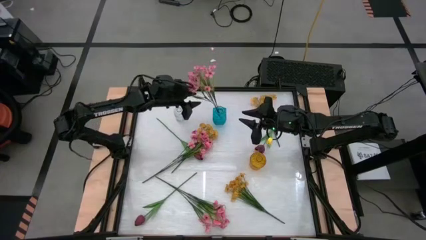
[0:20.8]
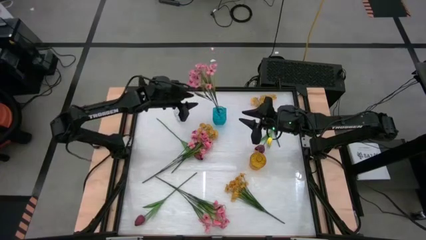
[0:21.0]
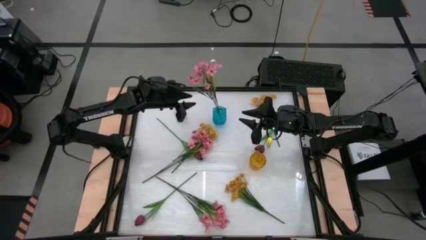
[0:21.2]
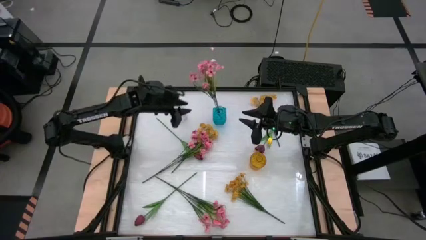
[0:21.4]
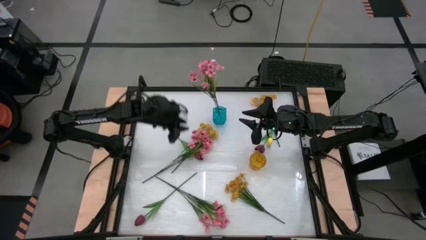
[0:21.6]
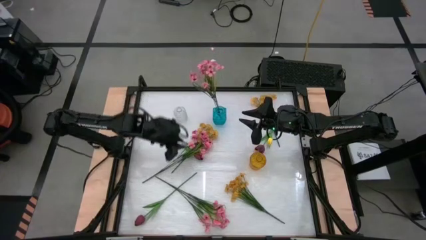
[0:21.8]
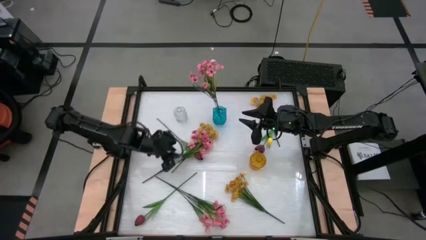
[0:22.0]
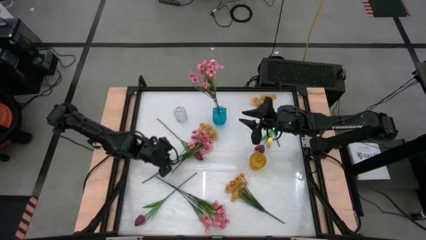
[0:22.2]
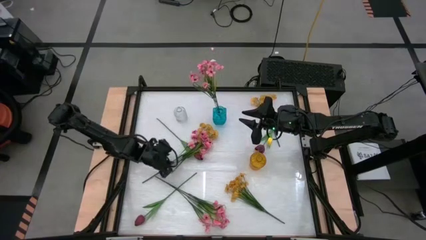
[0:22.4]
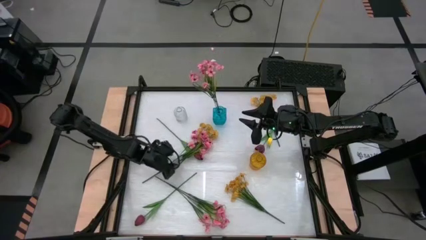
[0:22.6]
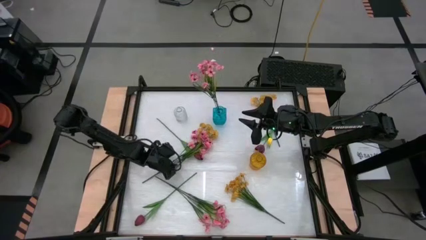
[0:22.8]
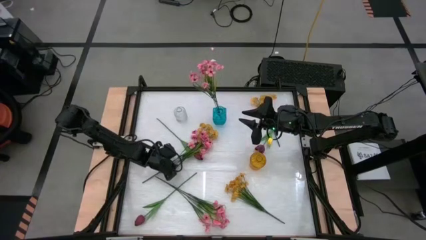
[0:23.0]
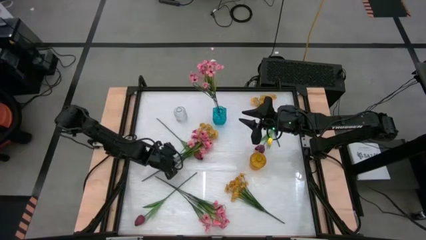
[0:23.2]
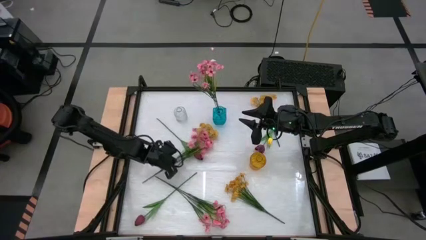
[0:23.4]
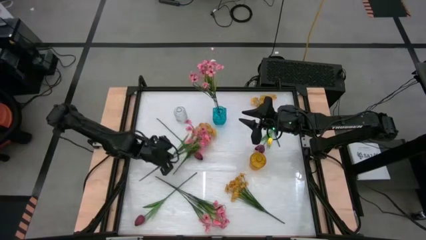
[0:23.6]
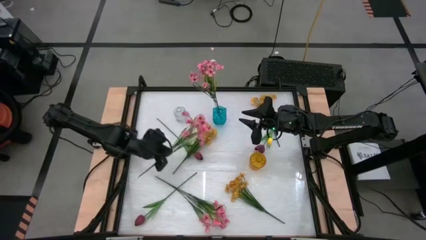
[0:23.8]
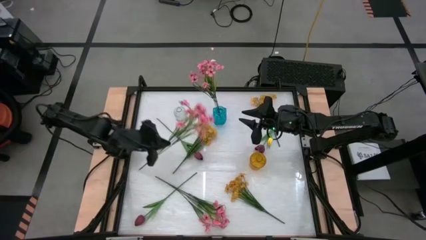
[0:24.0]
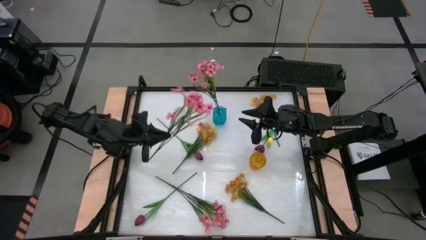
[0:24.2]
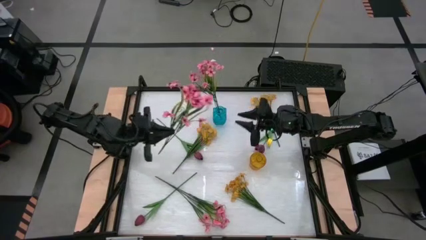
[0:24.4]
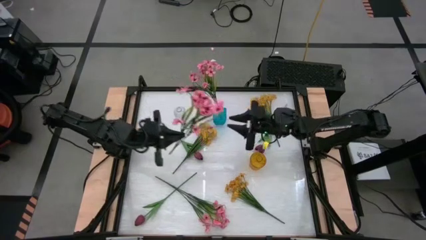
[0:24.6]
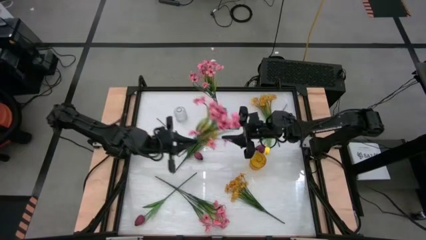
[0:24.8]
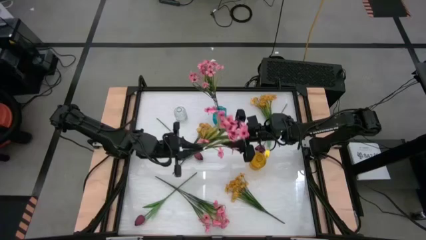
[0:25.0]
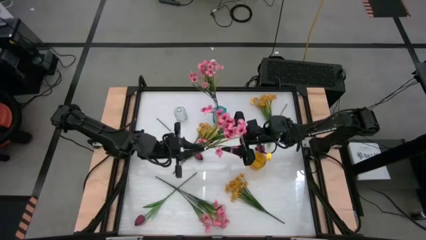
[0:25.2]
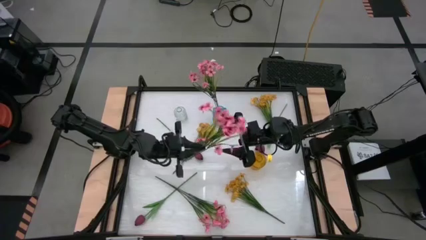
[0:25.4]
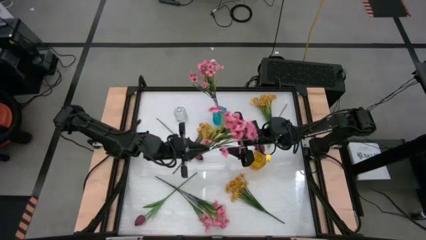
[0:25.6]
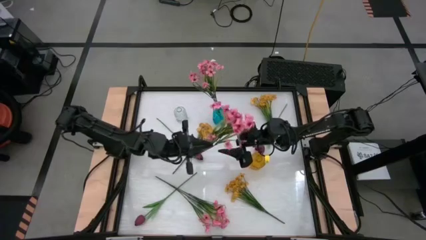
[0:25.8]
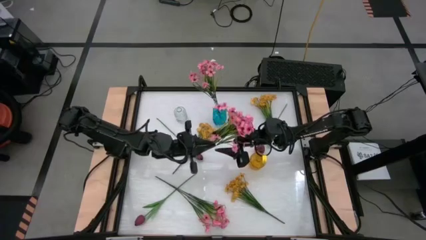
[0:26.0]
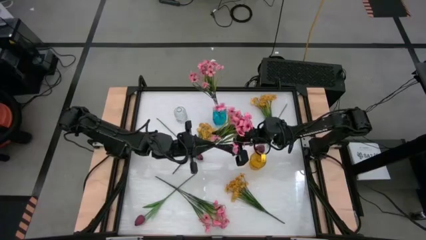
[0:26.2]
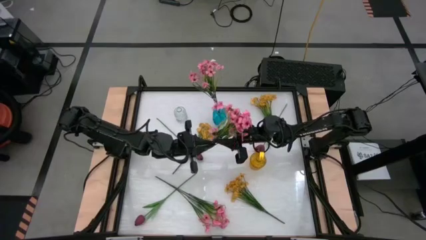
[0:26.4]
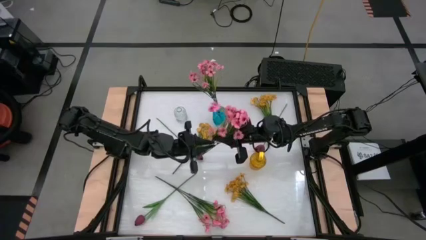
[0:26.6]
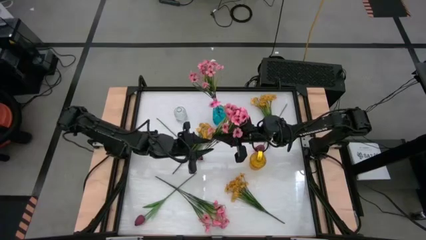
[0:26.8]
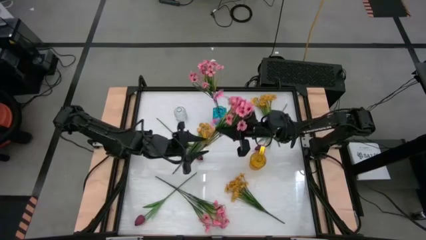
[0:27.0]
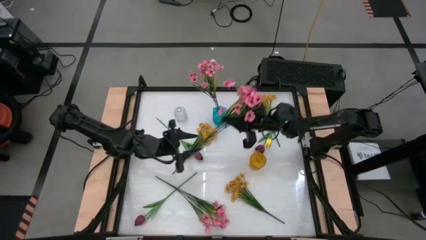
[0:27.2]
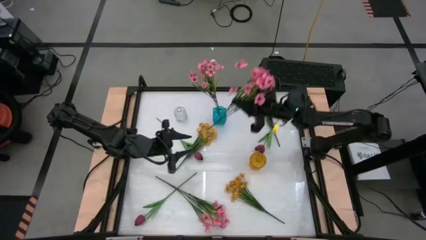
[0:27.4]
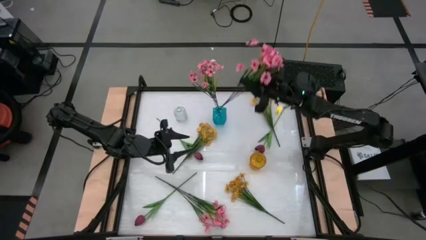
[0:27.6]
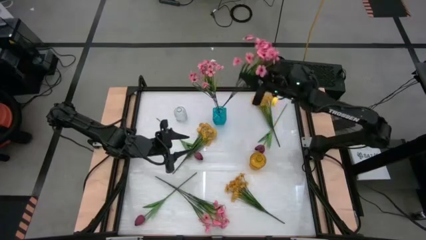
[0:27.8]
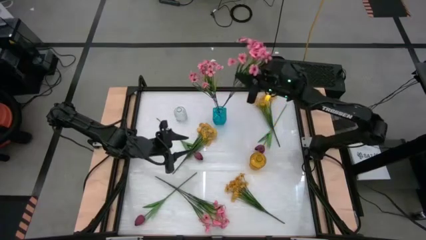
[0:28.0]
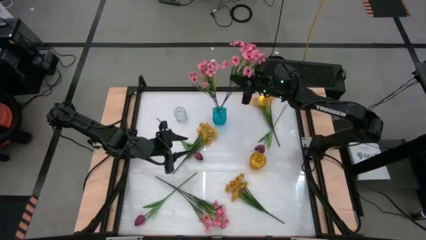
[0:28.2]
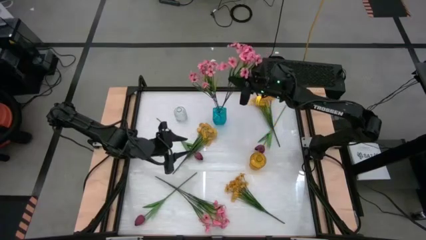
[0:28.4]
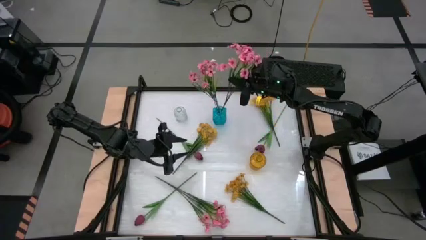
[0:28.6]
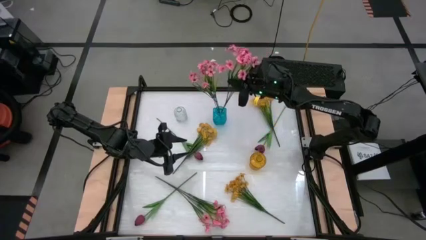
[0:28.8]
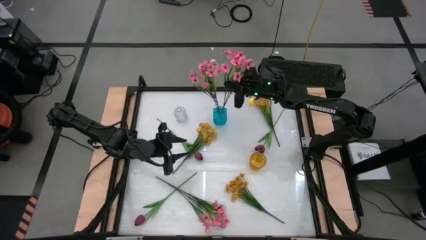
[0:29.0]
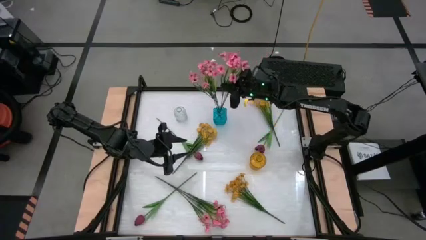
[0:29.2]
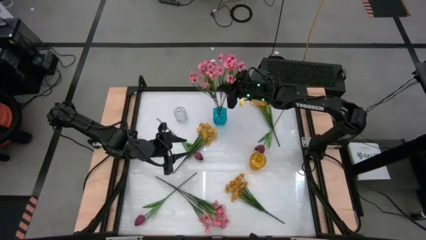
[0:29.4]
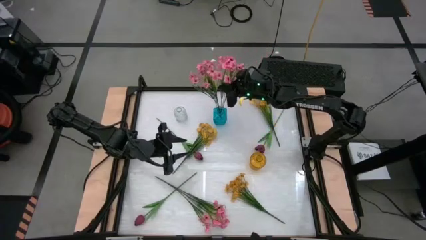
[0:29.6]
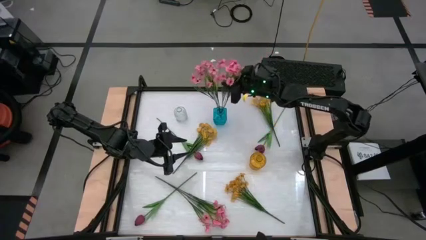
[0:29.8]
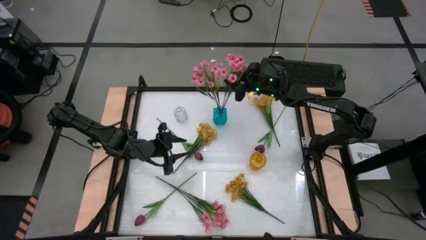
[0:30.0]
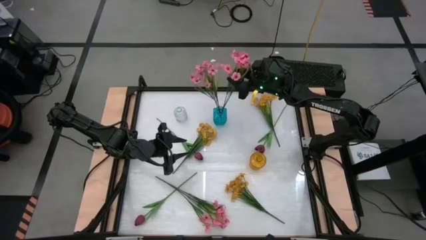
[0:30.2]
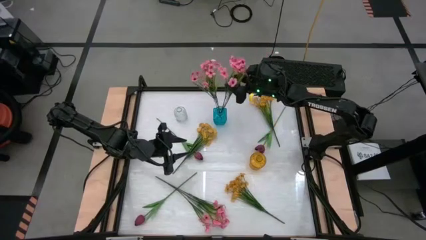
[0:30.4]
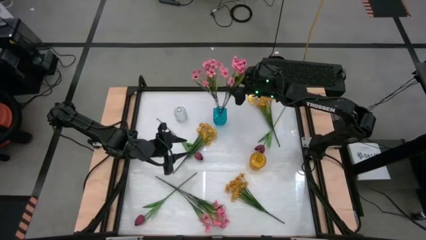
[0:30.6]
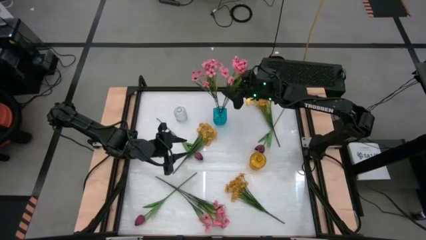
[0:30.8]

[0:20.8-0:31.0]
Task: Sort flowers into vase by color
Put the top pink flowers into the blue vase
